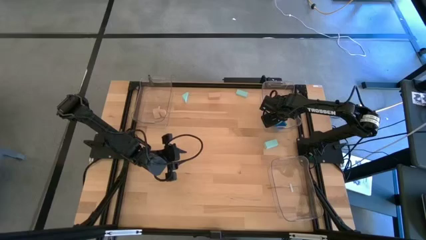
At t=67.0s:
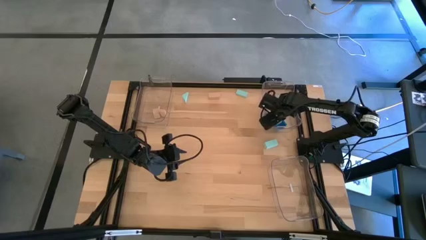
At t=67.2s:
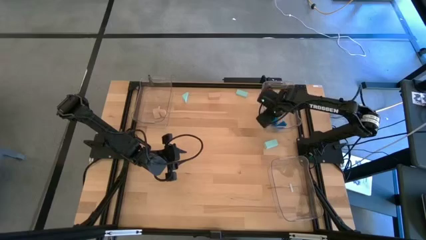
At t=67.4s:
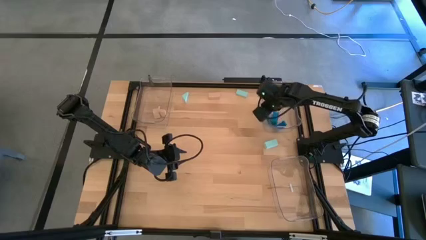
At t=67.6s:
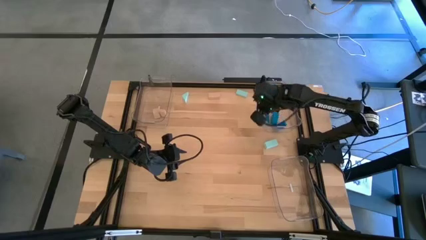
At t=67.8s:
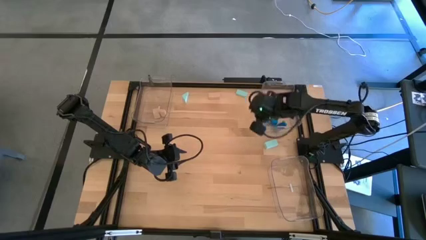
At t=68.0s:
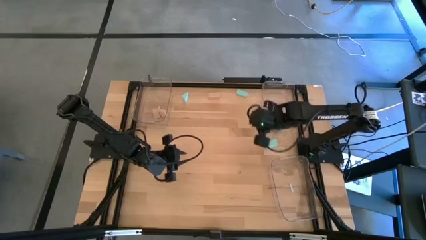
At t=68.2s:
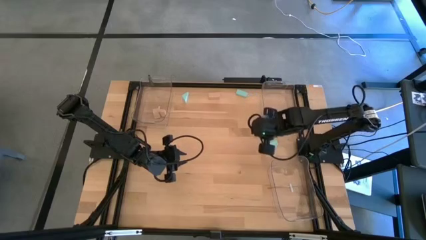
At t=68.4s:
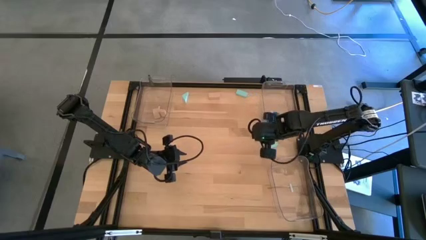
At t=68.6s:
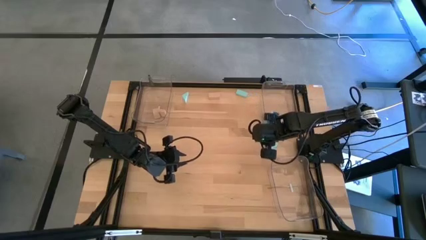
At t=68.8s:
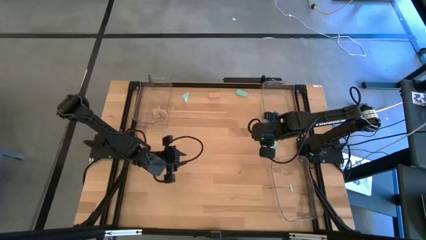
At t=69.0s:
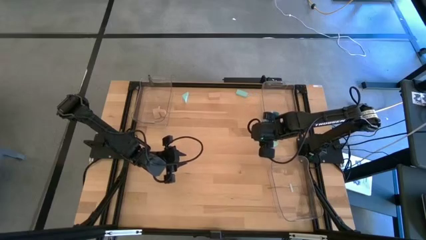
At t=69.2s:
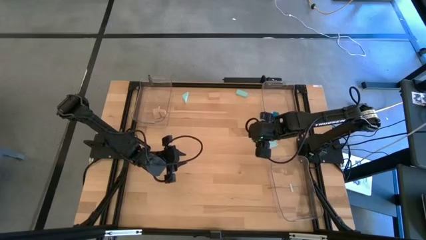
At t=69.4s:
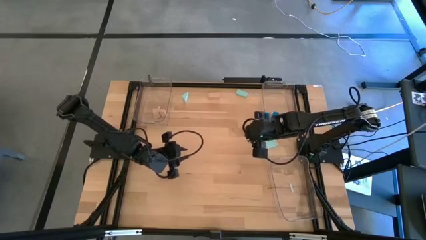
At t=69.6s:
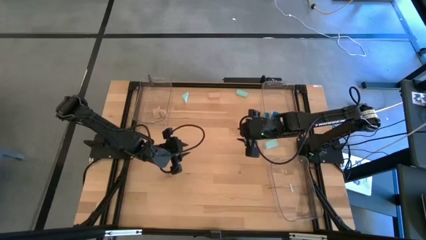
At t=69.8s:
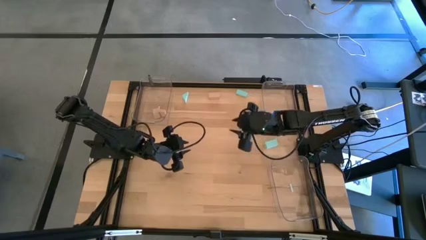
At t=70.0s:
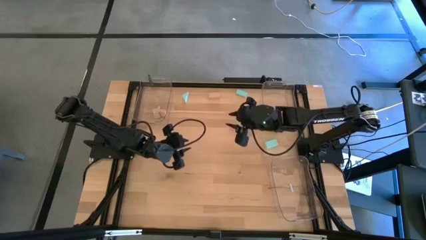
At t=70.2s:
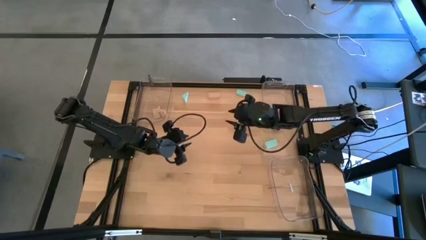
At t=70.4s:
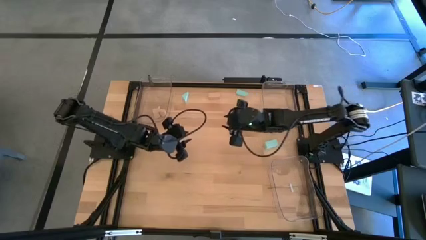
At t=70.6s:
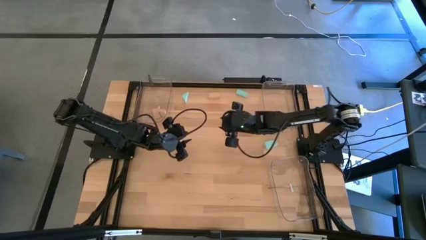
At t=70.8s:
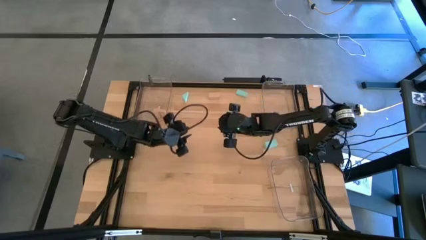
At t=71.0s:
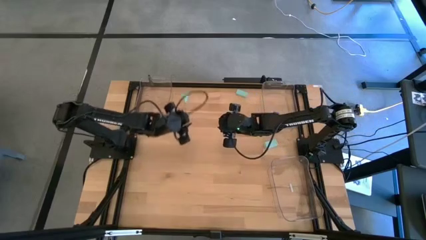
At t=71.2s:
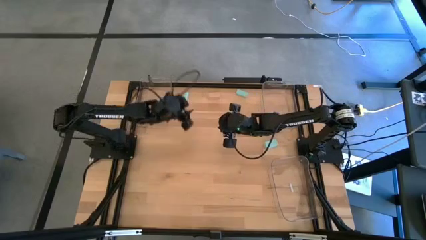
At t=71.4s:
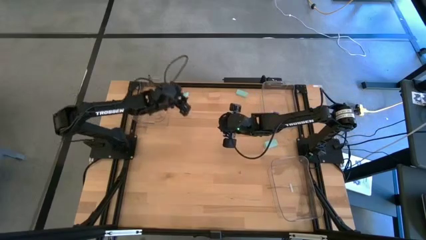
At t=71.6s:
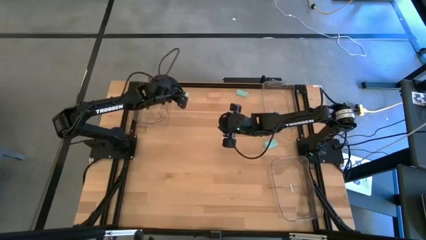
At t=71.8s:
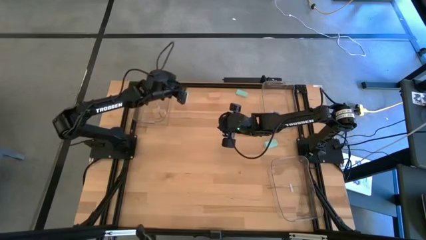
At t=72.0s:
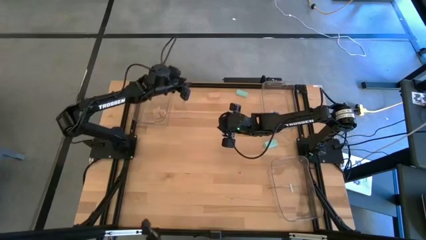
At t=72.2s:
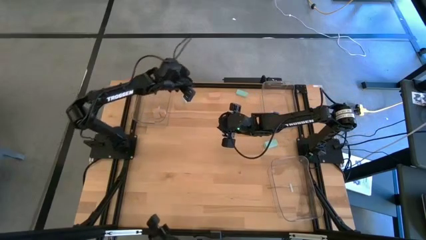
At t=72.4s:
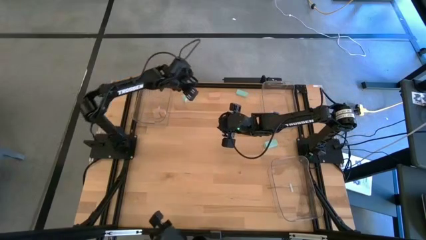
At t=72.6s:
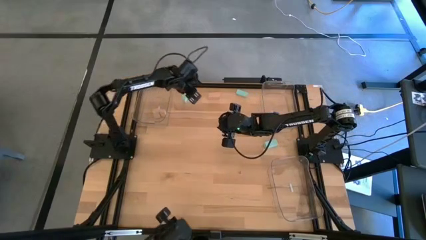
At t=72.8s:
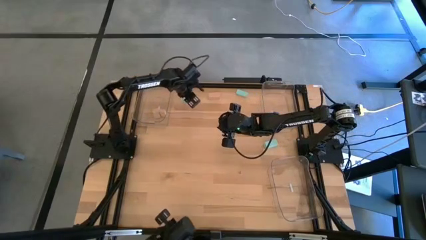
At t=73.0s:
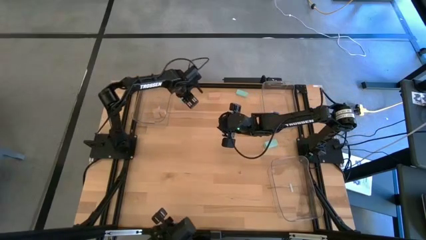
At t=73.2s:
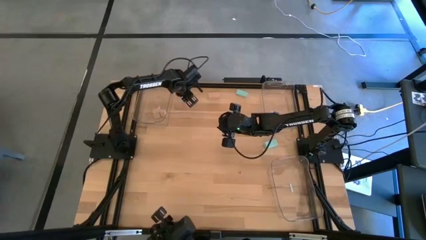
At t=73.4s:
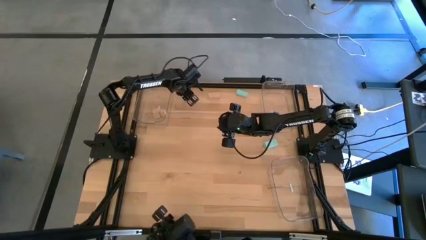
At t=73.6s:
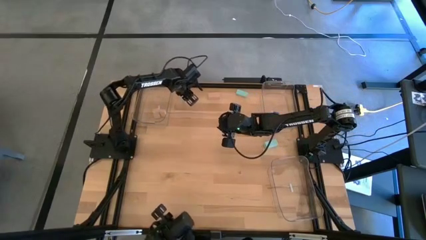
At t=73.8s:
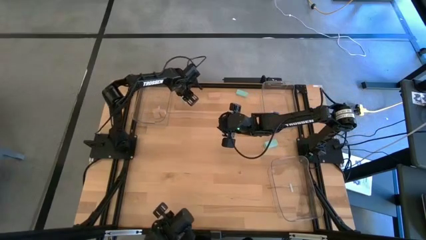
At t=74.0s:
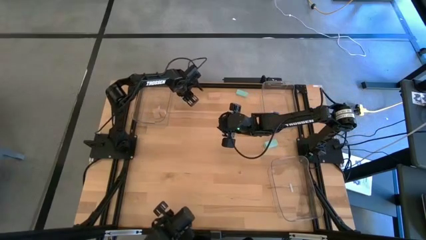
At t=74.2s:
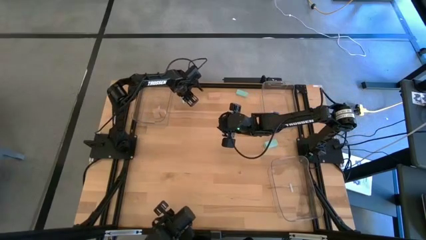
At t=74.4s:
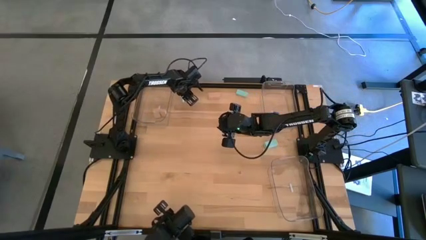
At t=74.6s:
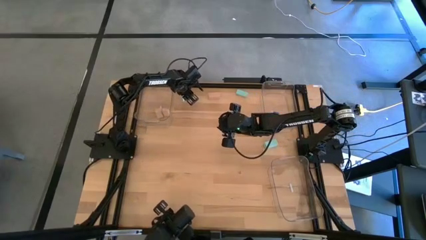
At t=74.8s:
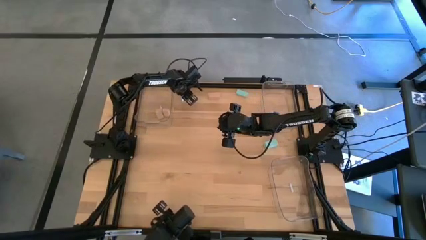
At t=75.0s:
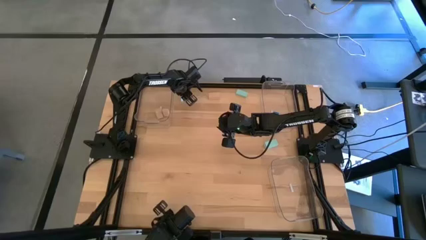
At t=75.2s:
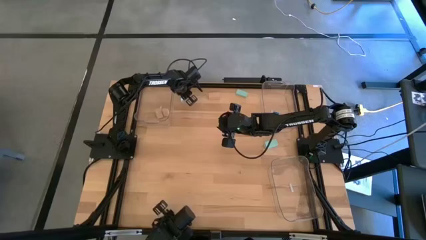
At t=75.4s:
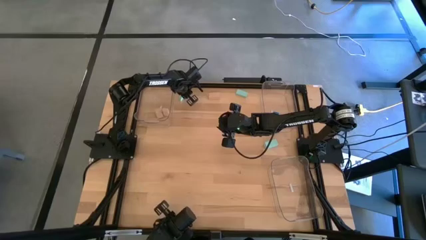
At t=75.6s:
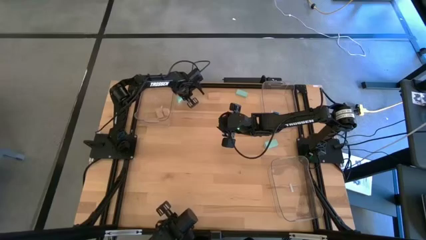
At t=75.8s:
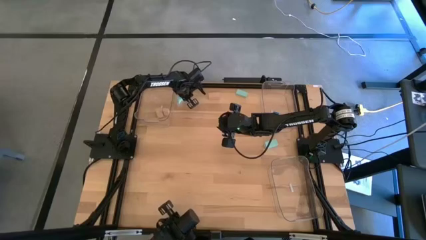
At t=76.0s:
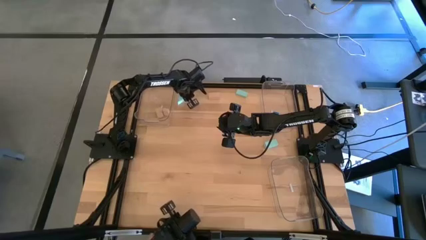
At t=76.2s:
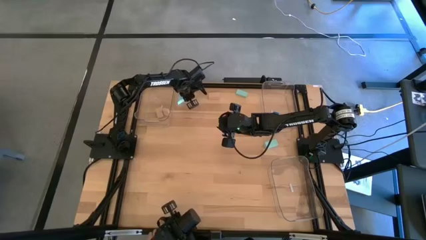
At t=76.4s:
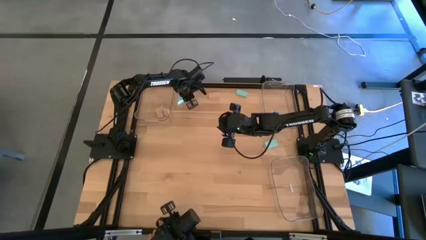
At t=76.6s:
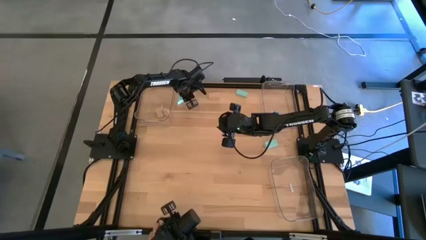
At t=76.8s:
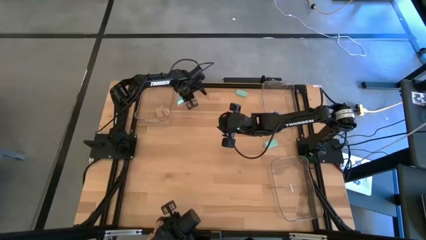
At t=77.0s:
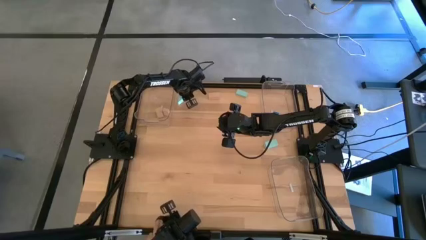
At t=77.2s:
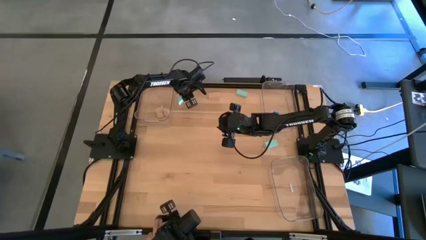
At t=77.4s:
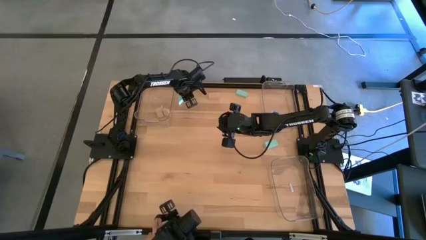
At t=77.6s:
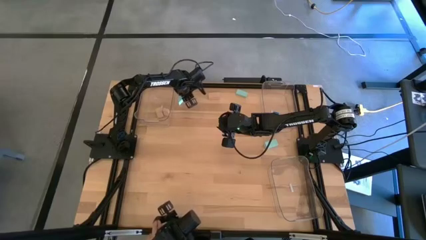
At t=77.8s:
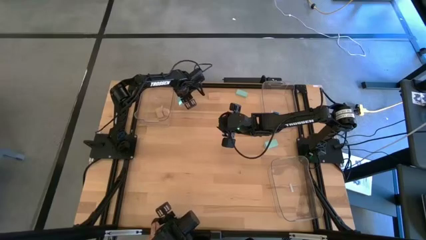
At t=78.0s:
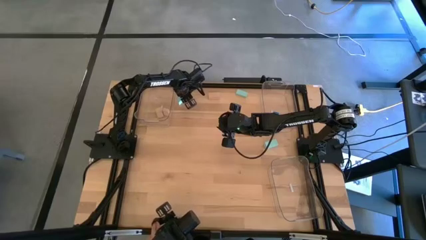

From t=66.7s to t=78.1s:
Task: Sort & place blocks by color
Put the top left light blue block into the bottom right transparent bin

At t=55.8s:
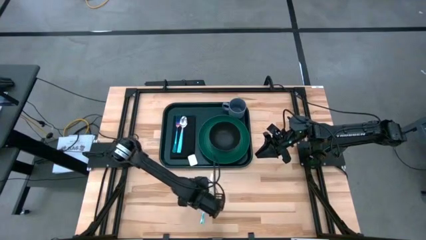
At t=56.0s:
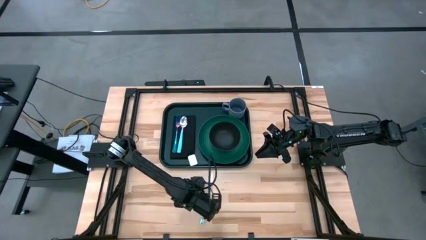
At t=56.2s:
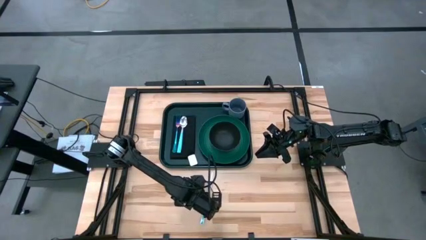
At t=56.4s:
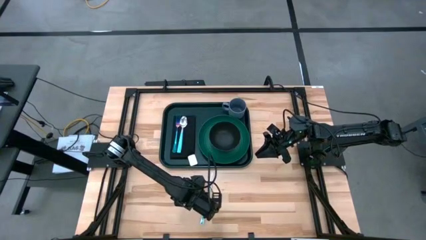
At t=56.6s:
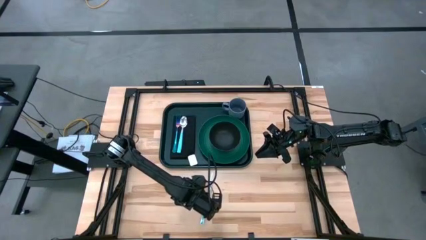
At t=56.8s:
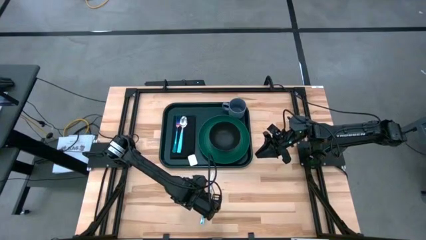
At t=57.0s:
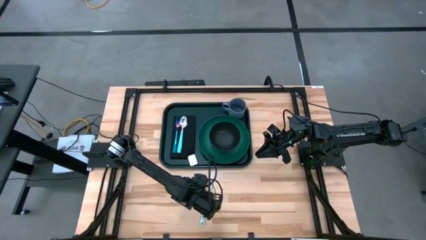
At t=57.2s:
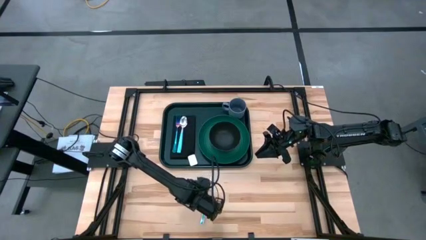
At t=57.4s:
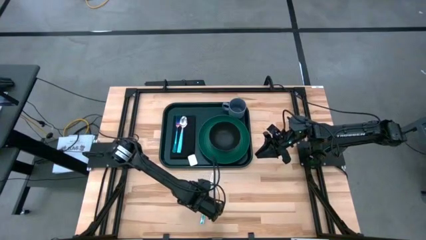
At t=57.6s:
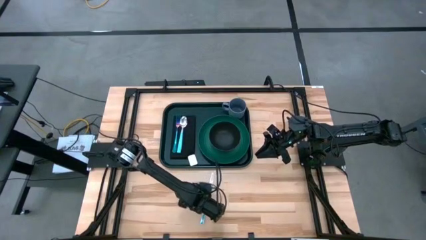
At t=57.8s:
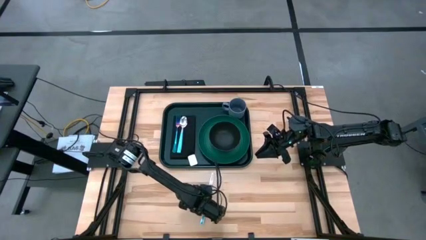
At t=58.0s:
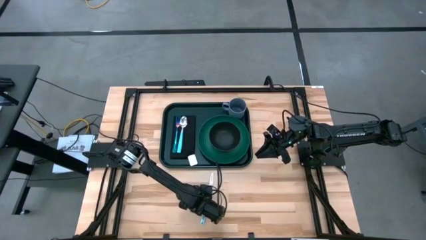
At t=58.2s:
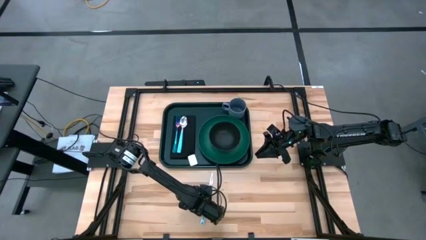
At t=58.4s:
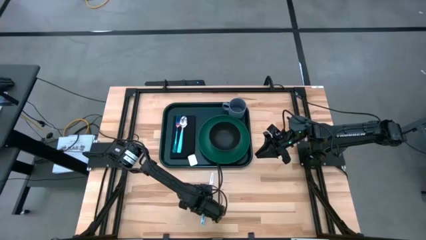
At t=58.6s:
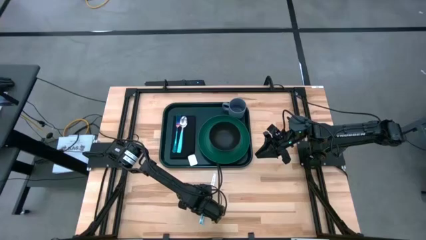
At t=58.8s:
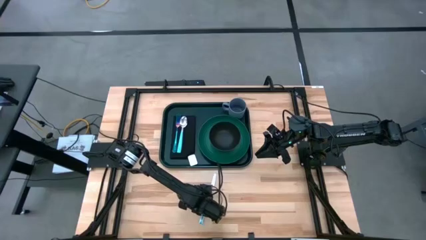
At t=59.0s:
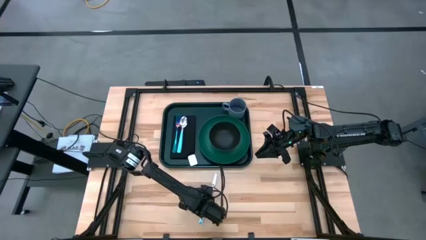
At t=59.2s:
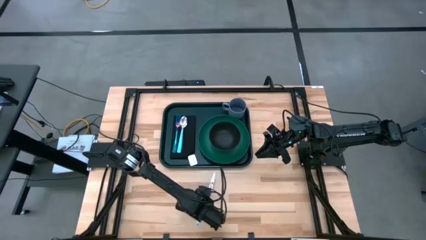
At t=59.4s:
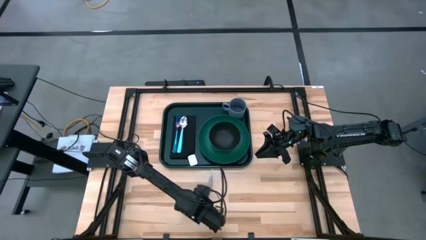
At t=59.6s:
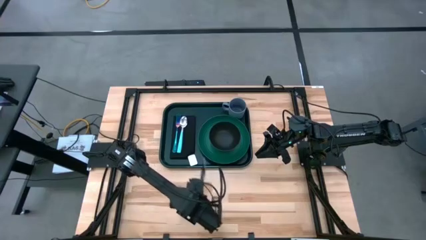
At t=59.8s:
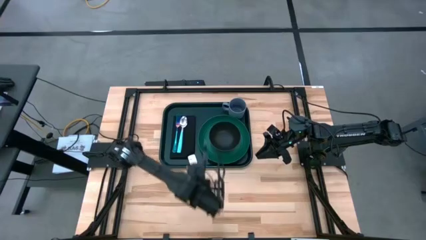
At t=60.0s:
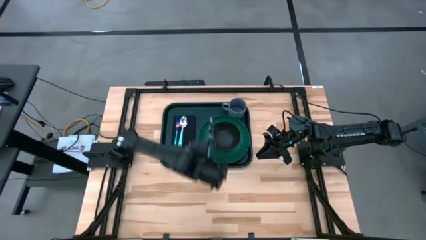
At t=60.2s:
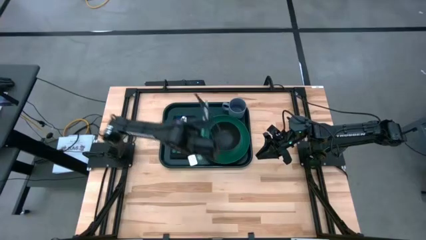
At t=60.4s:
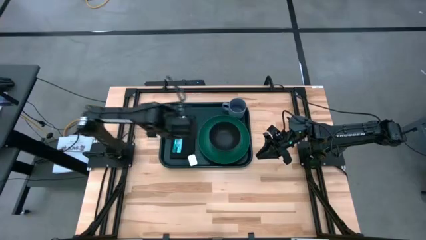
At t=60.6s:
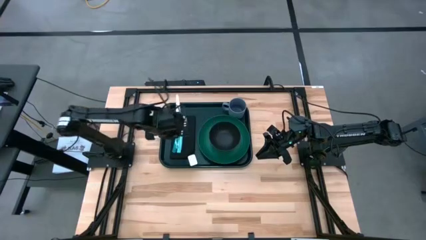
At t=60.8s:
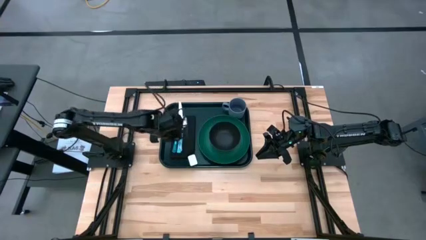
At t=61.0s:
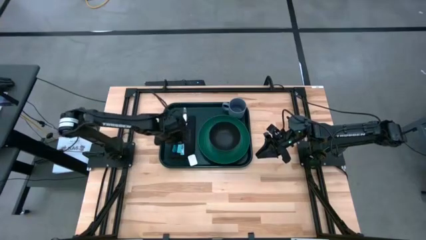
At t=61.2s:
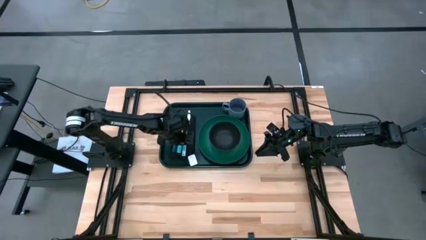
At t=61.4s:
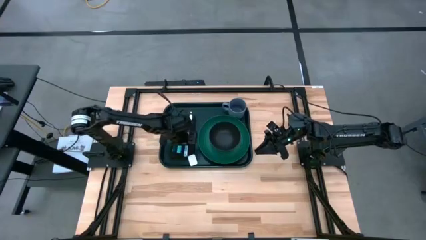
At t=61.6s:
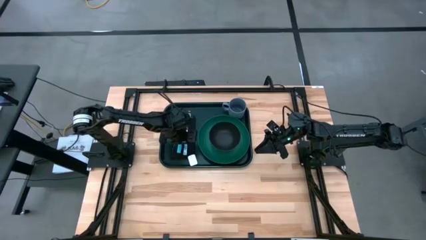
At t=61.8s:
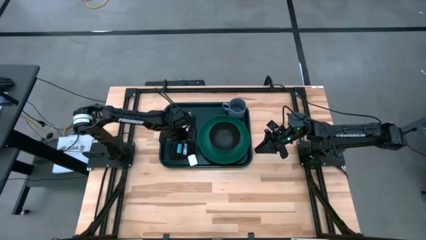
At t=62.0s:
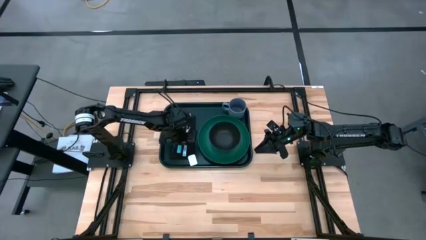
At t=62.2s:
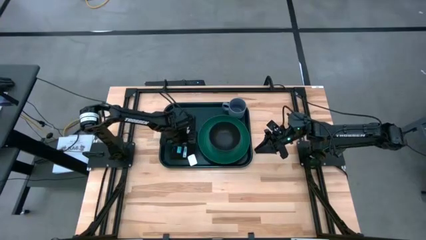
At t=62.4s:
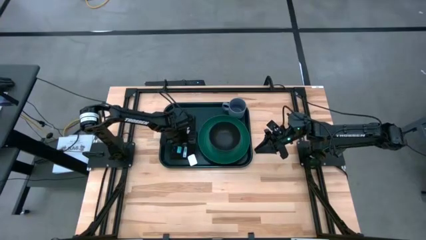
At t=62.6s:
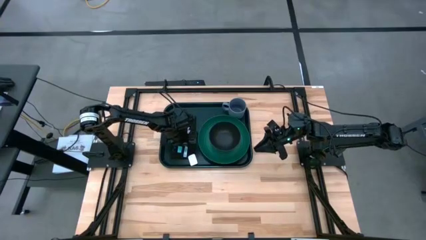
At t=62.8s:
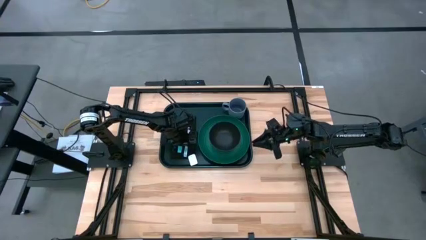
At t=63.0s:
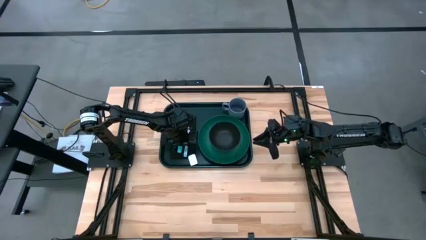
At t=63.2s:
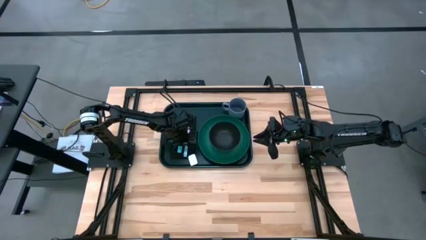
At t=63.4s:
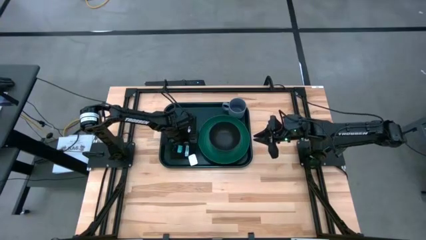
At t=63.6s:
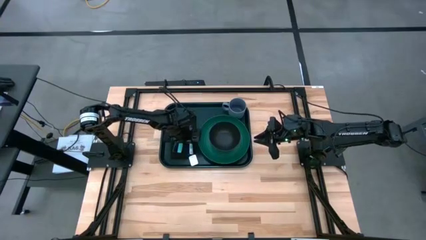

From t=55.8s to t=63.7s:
Task: Set up tray
Put the blue knife on the black napkin to the right of the blue spoon
